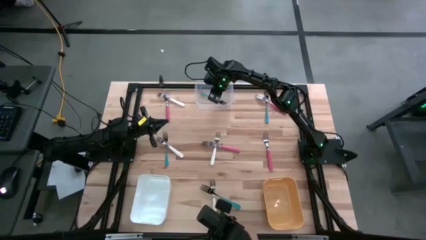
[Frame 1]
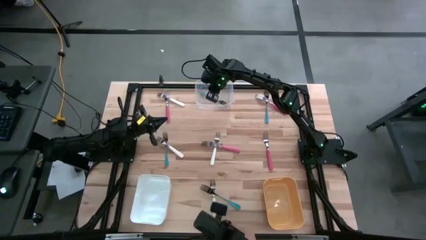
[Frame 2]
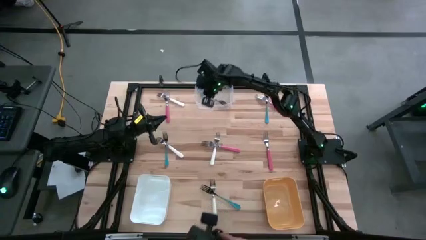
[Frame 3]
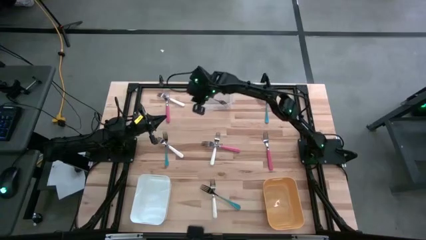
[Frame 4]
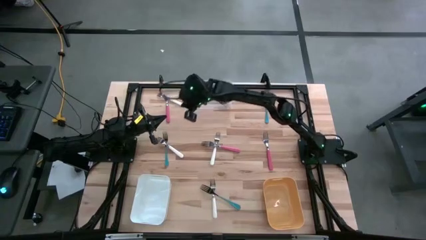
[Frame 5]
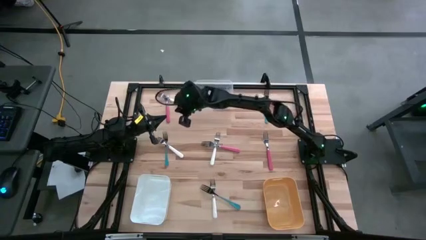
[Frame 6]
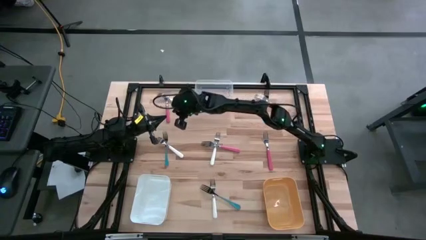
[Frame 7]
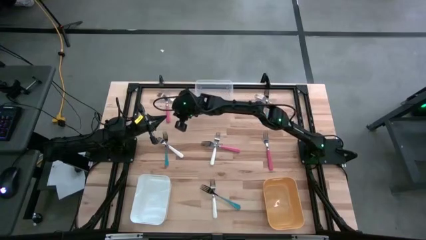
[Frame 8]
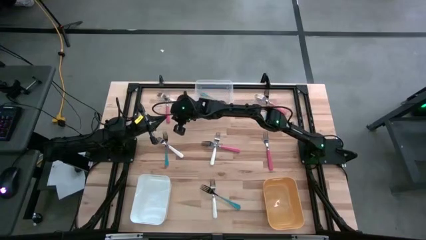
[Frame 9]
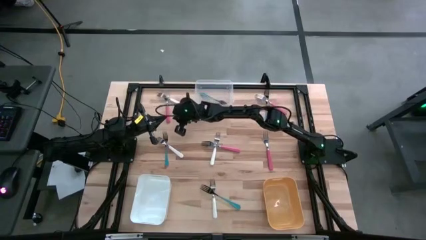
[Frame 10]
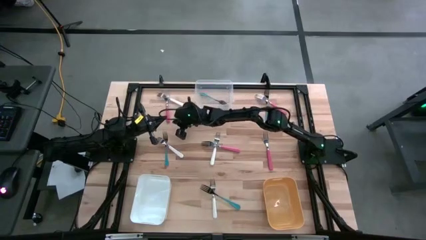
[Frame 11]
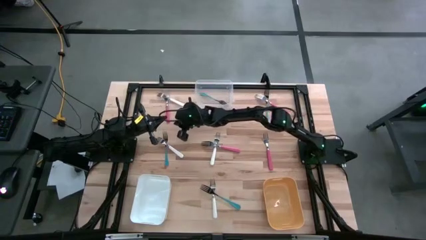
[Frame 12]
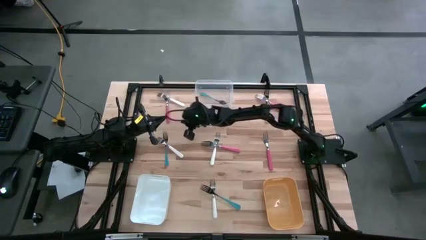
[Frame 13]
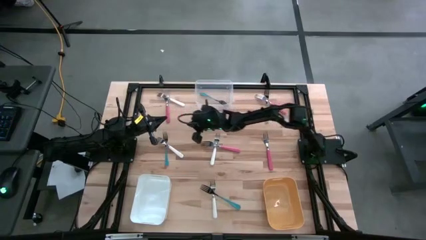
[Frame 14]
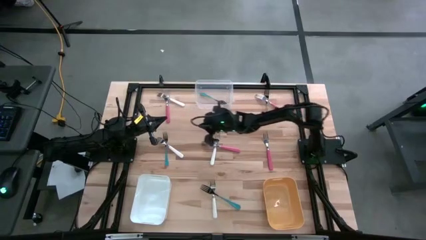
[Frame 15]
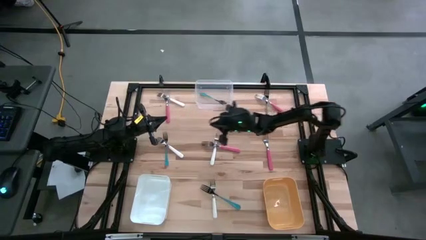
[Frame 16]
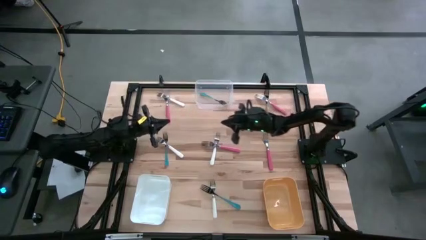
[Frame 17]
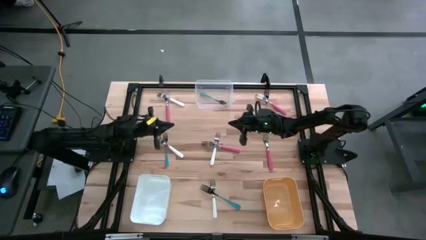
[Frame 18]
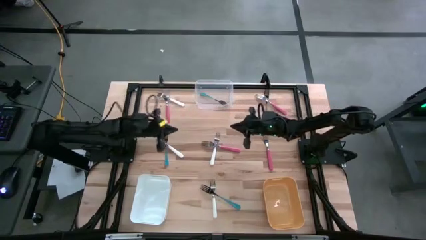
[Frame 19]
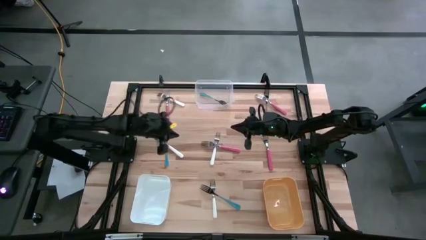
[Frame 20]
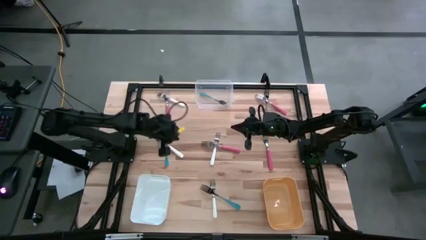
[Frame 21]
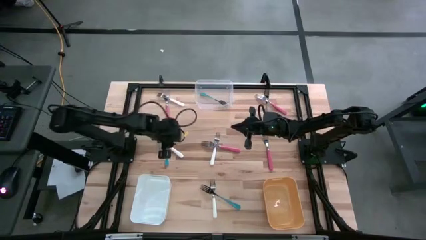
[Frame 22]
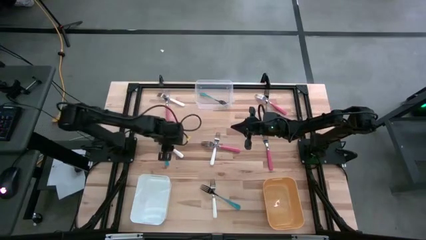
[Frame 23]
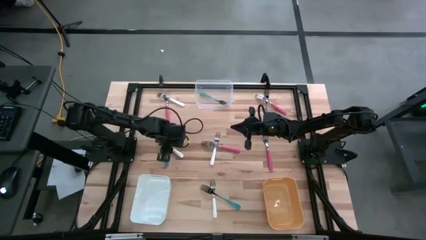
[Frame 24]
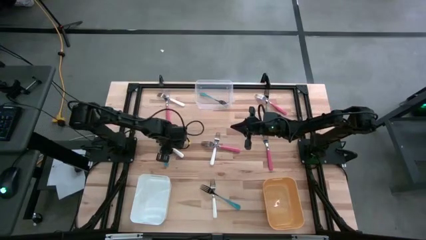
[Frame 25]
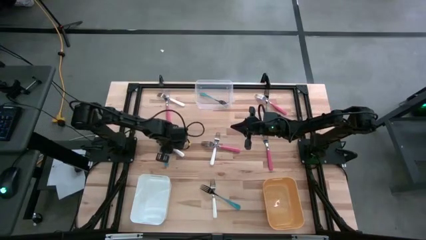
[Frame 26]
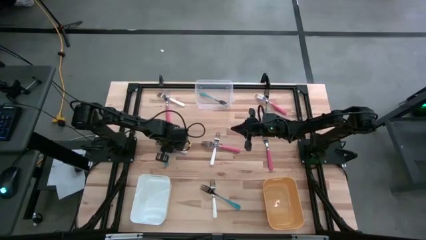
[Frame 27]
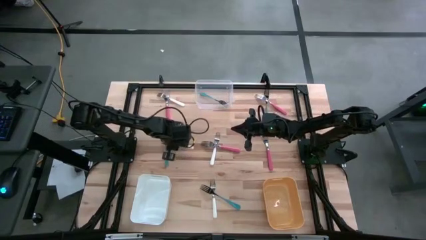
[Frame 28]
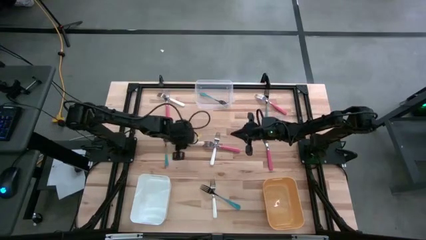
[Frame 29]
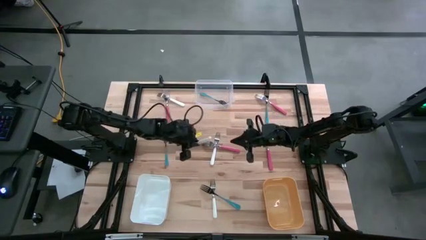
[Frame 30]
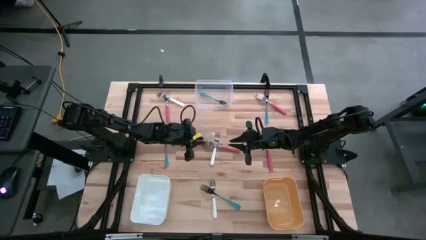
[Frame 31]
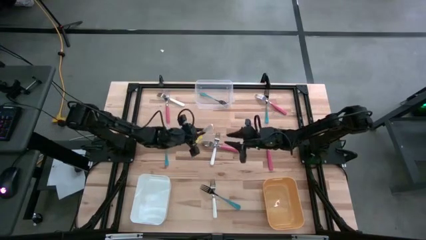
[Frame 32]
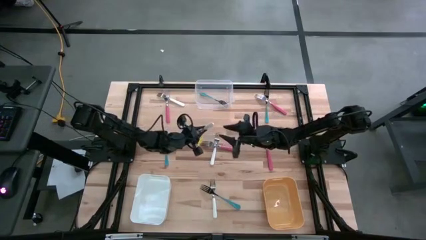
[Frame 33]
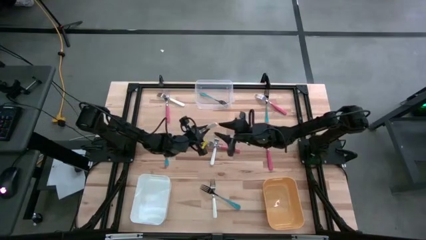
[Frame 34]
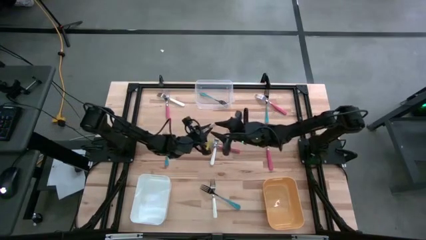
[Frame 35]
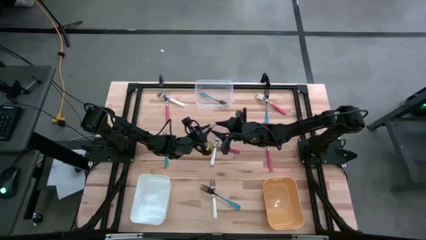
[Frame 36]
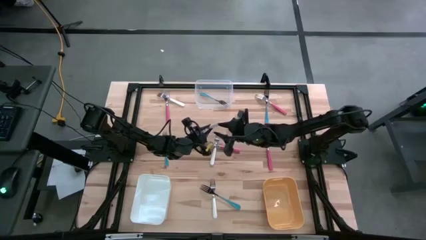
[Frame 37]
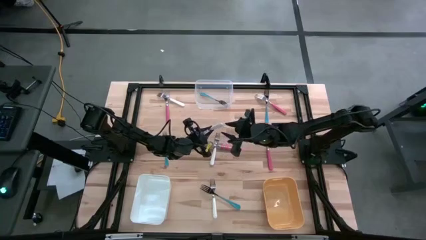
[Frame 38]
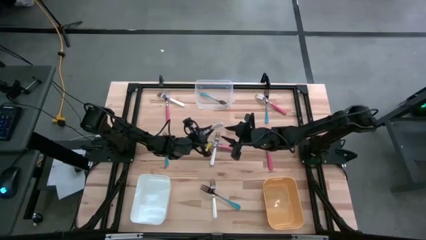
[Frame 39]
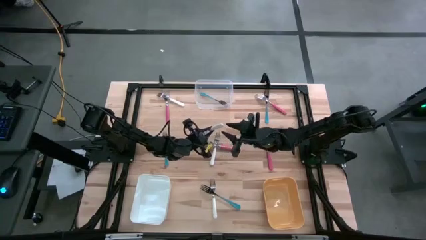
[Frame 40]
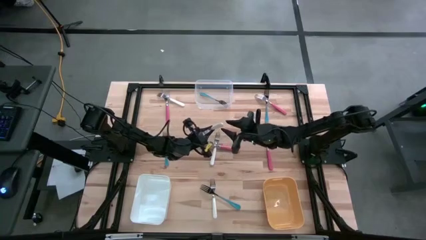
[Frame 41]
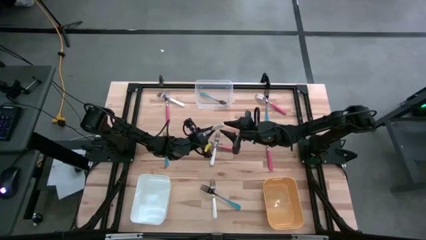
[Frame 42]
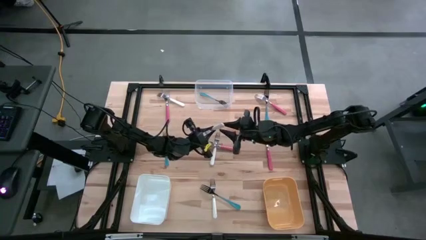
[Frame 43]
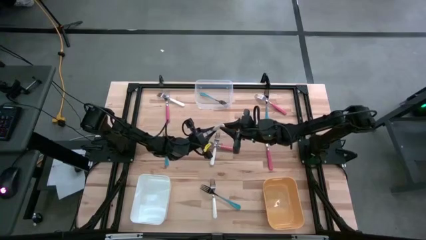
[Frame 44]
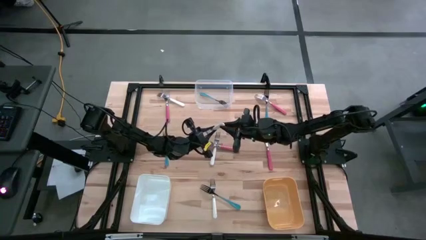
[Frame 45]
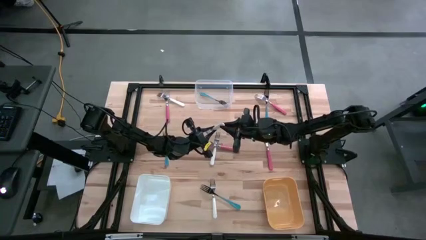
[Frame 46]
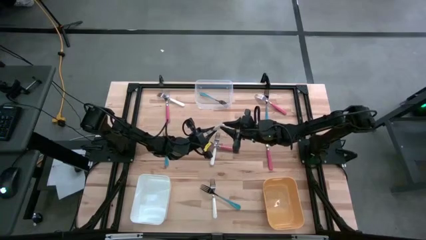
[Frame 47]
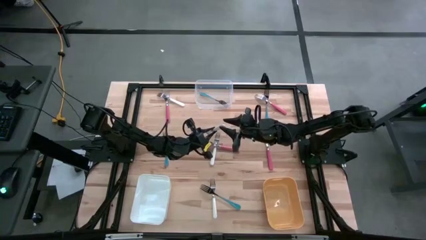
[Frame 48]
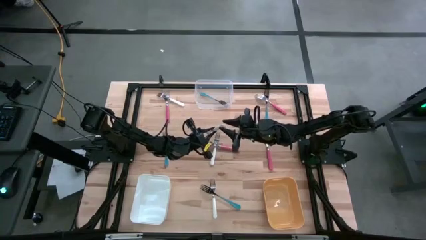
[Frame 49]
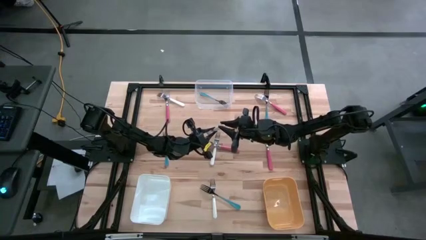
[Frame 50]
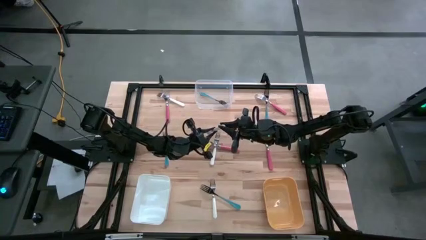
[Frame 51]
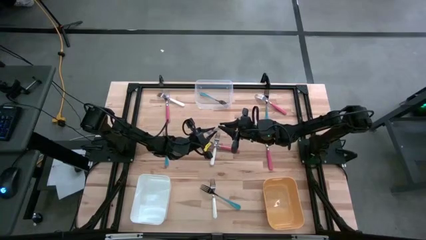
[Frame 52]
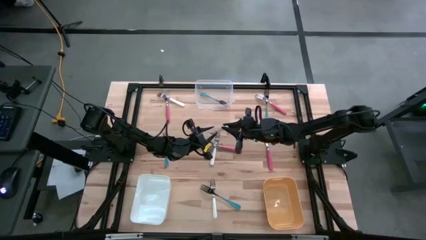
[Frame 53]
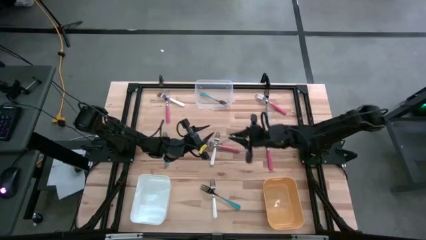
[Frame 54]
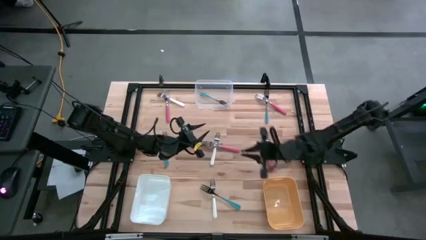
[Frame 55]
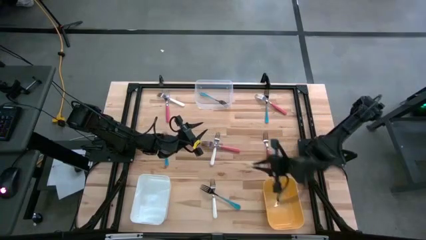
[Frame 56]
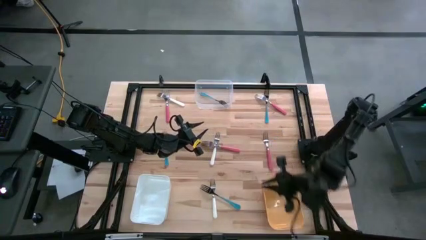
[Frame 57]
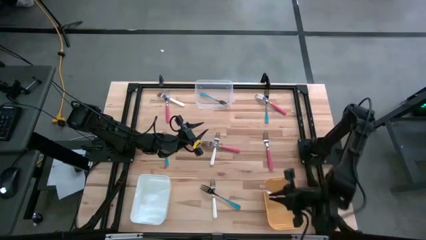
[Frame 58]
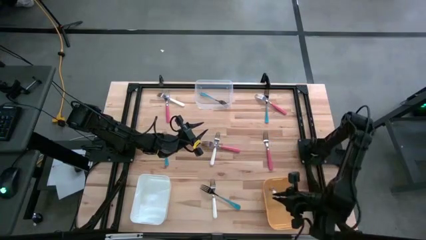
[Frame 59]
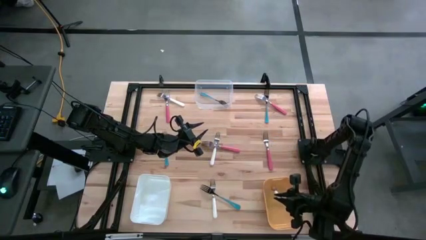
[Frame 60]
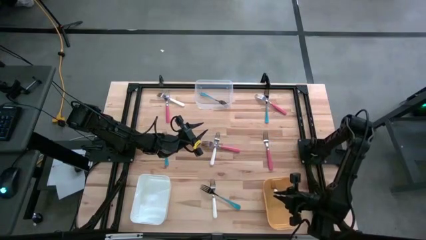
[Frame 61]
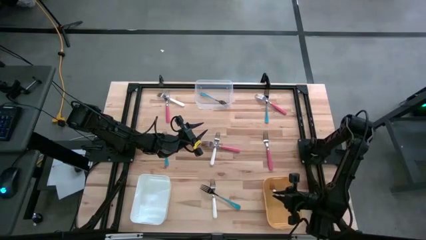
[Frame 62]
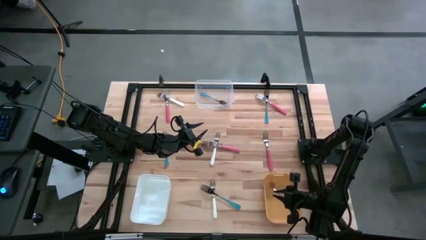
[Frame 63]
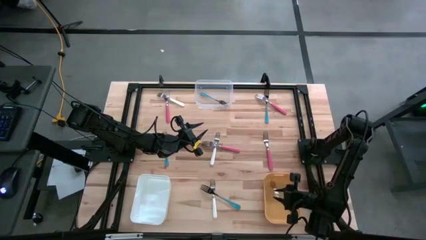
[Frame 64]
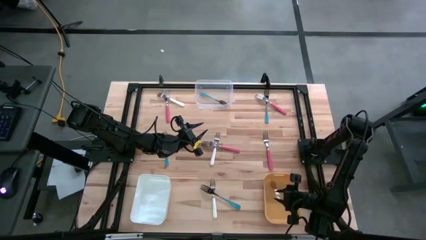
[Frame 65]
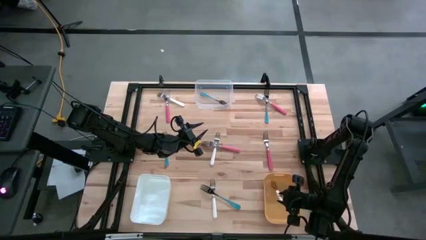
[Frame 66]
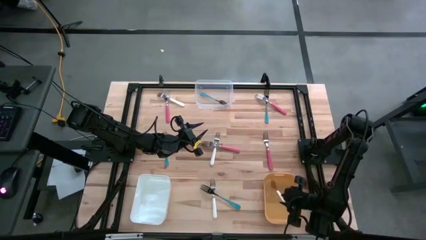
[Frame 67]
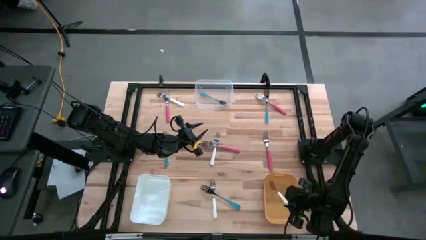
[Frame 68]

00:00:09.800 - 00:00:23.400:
Task: Sort silverware by color (type)
Put the white fork into the yellow bin
